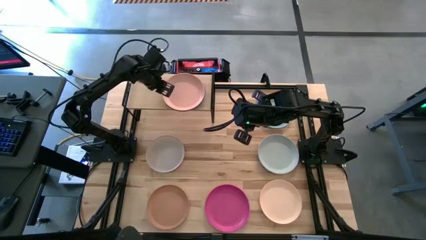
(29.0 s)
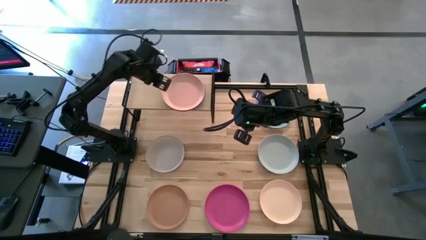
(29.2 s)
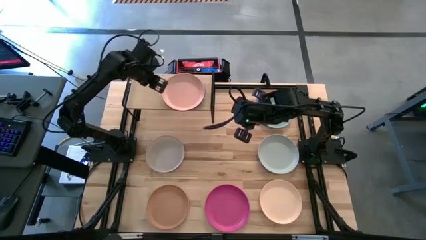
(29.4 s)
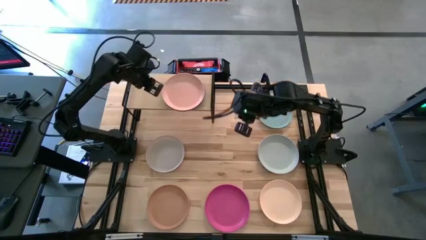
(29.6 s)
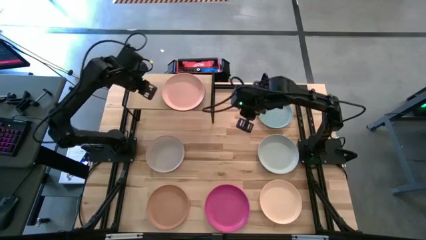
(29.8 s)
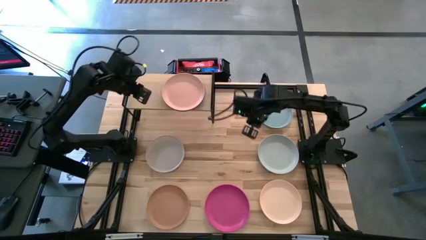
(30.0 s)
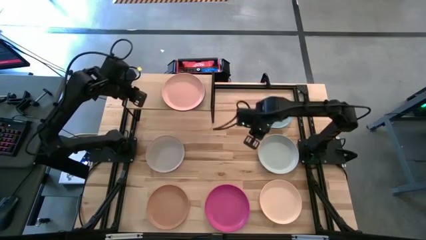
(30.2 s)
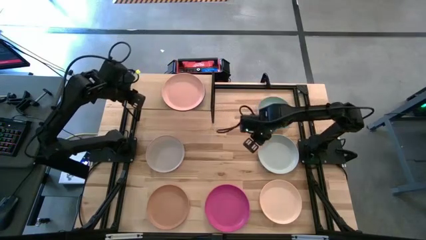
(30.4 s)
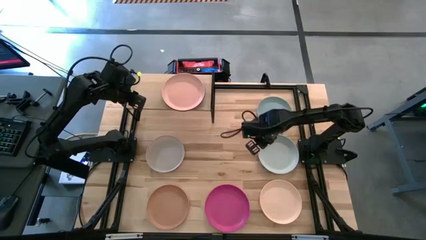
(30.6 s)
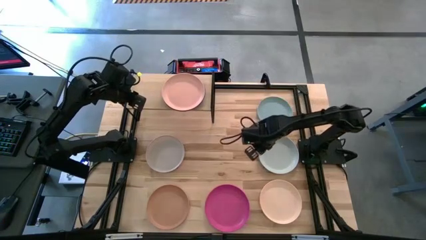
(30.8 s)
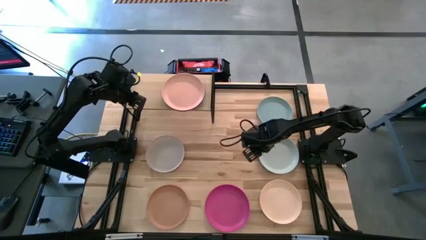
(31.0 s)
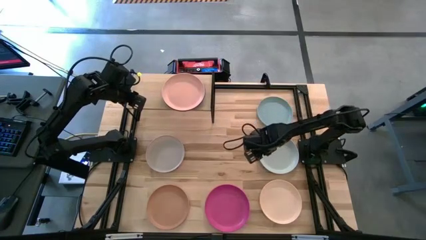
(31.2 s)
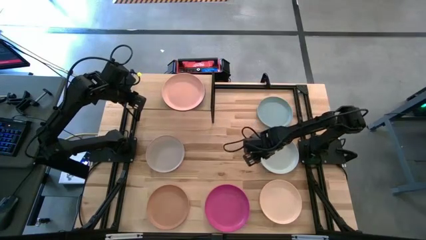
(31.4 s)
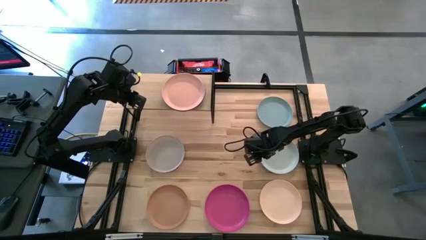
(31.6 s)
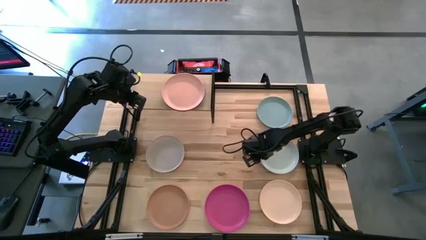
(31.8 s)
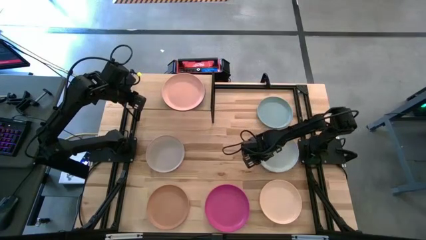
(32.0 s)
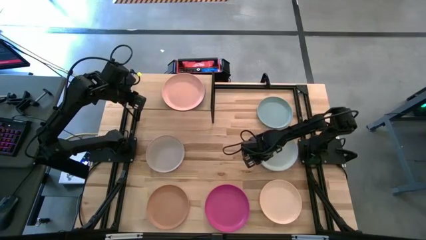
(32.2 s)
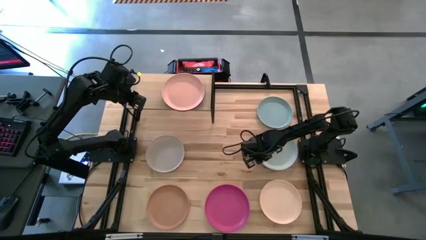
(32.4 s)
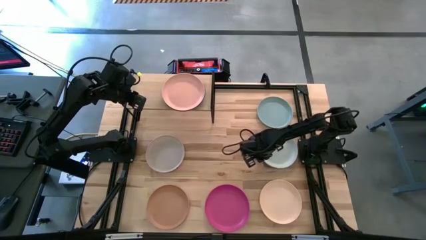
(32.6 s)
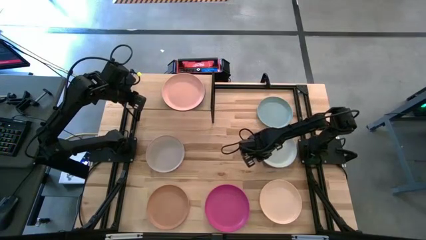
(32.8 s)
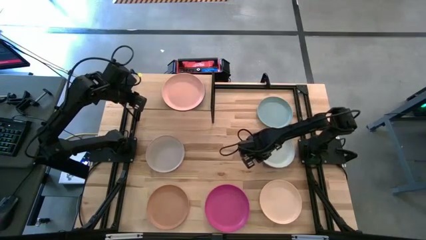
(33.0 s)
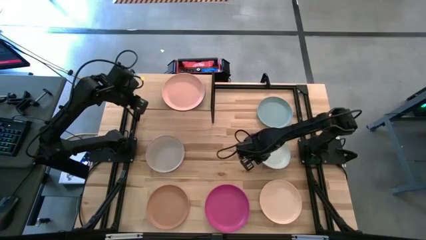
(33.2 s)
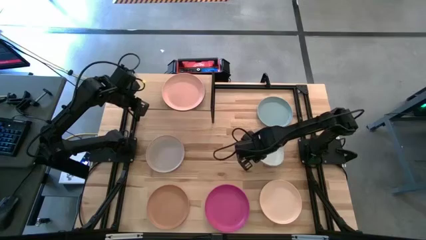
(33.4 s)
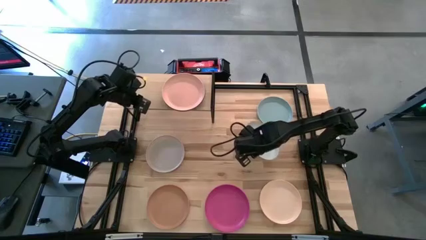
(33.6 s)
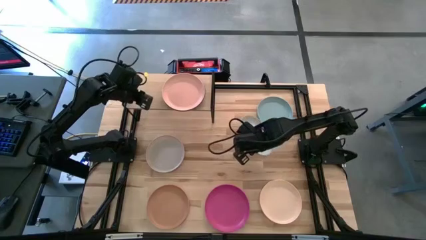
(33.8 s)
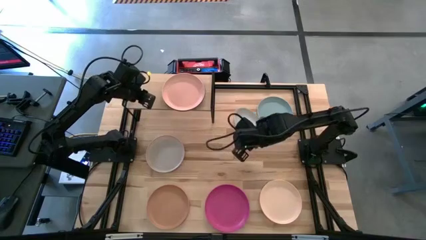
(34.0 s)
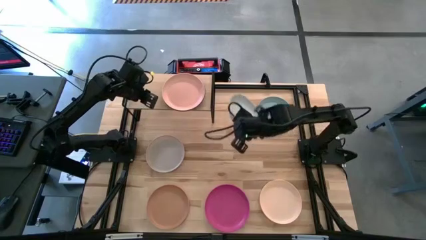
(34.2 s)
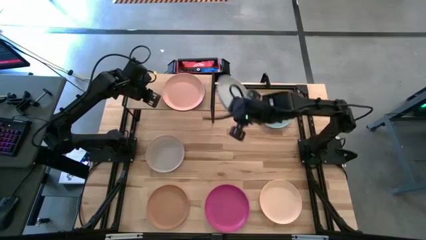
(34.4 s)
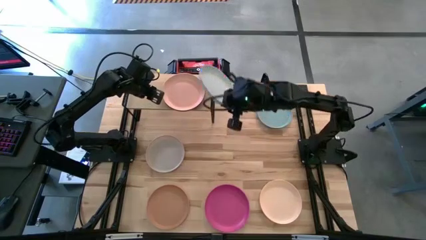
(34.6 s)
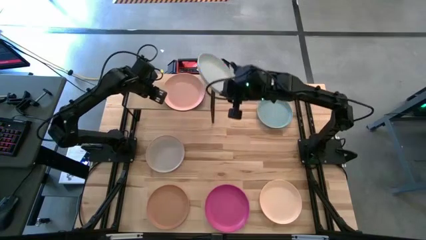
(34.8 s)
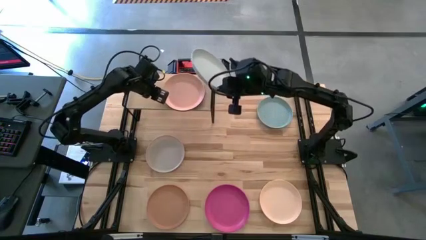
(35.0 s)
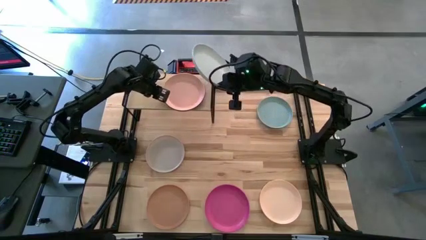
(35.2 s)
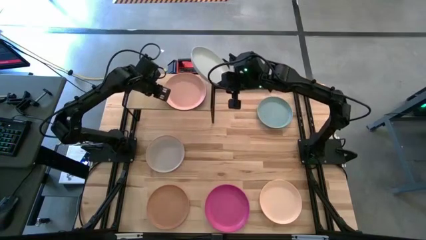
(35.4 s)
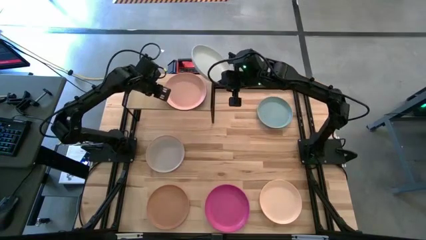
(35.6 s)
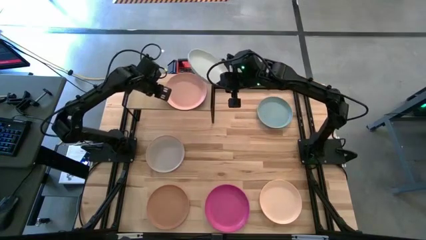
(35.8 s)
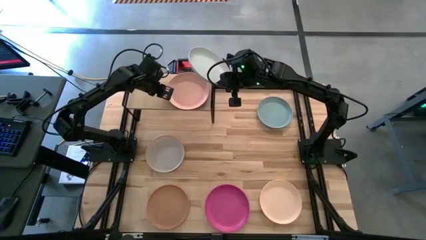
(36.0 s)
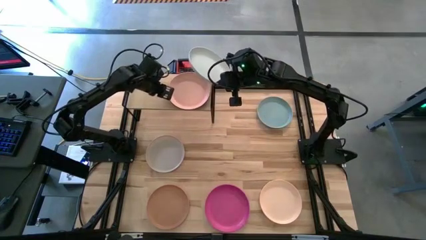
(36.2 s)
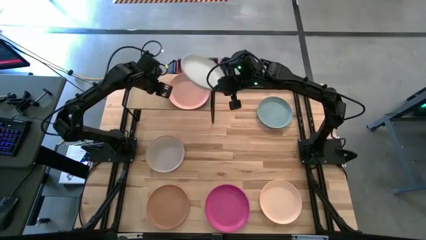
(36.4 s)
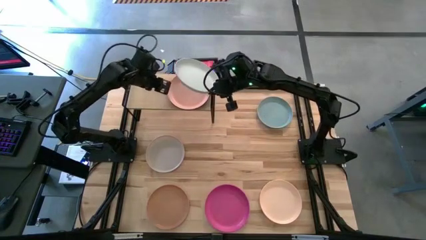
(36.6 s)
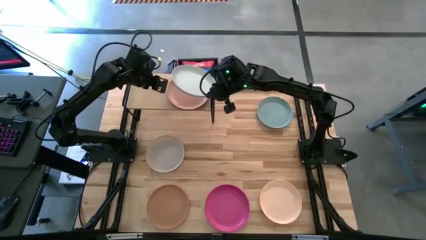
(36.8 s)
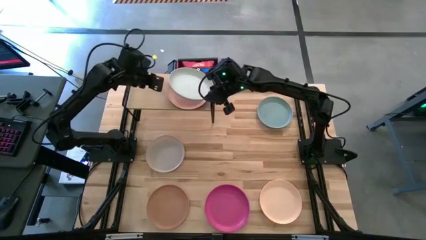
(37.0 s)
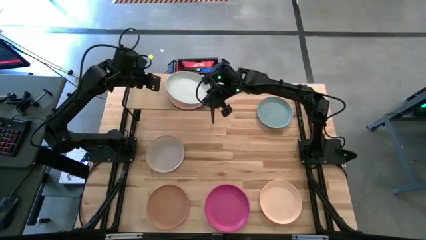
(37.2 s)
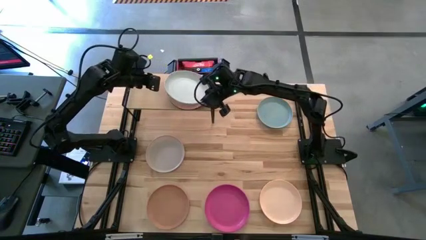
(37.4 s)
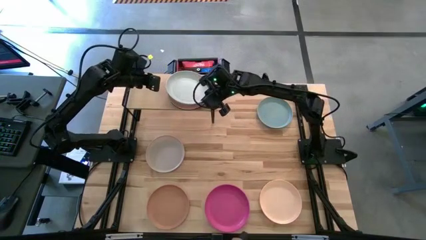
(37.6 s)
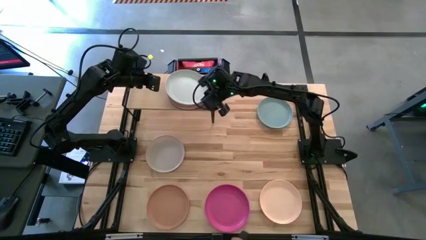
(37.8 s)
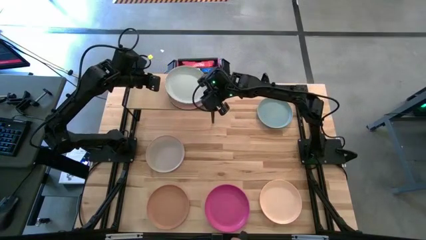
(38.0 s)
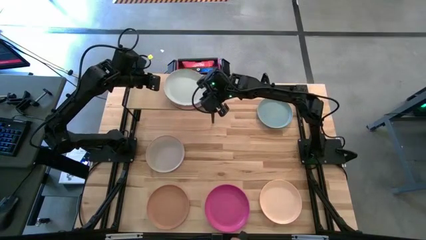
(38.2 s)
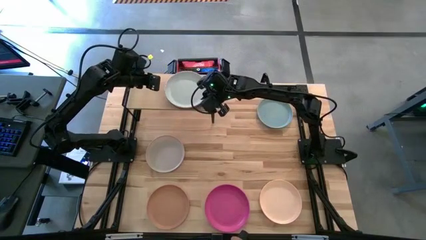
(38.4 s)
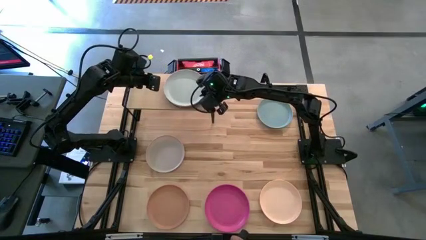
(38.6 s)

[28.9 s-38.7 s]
Task: Place and stack plates onto a shelf
Stack the white plate on the pink plate on the shelf
